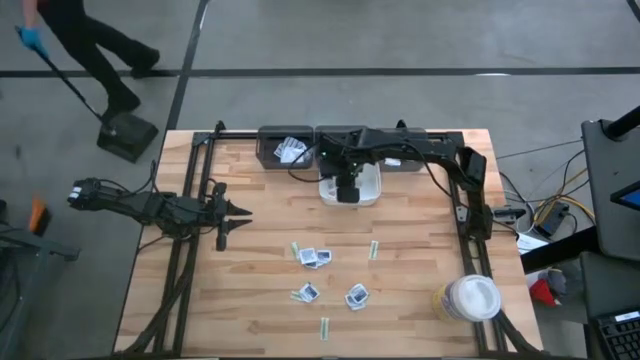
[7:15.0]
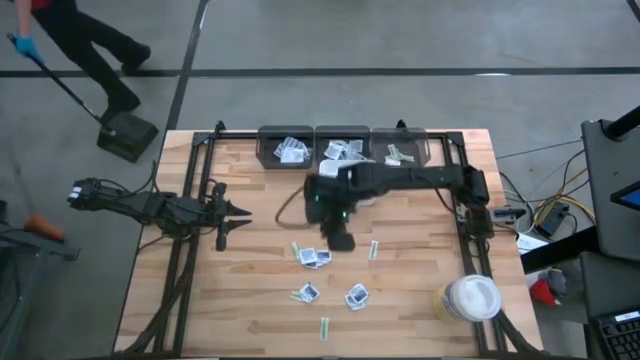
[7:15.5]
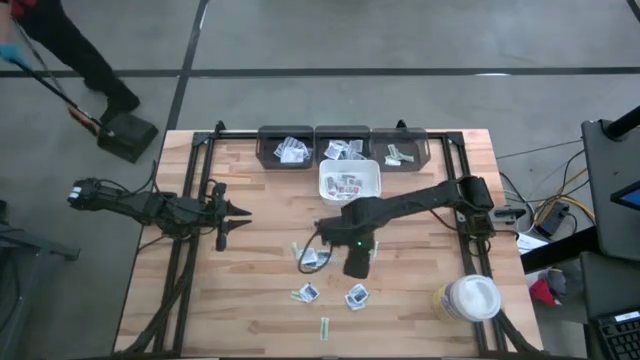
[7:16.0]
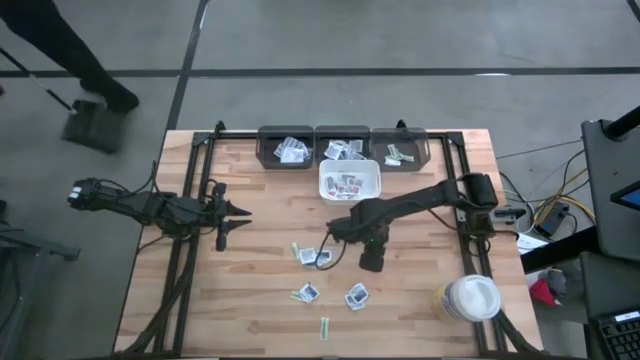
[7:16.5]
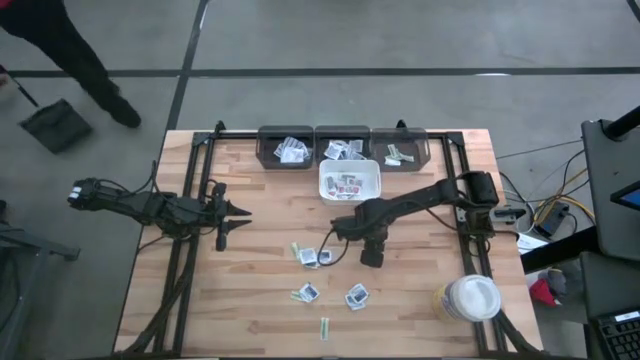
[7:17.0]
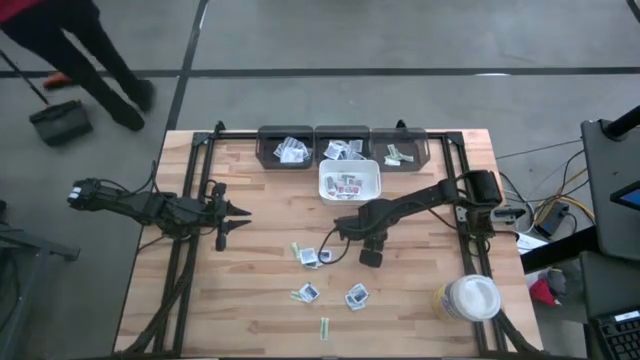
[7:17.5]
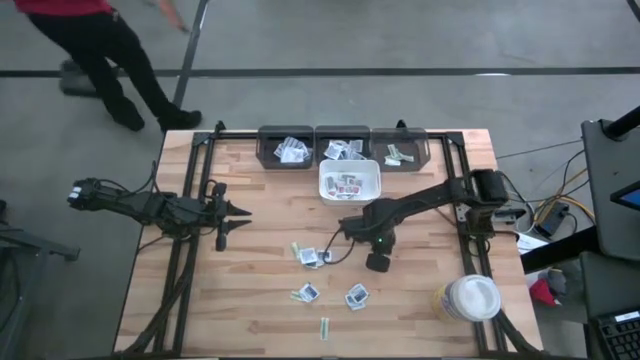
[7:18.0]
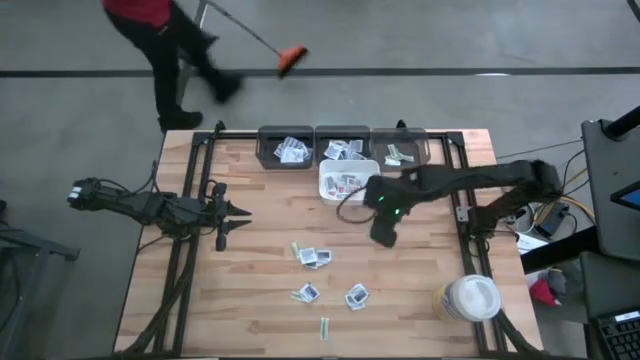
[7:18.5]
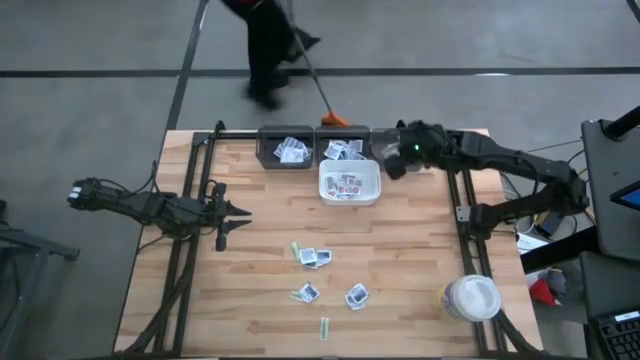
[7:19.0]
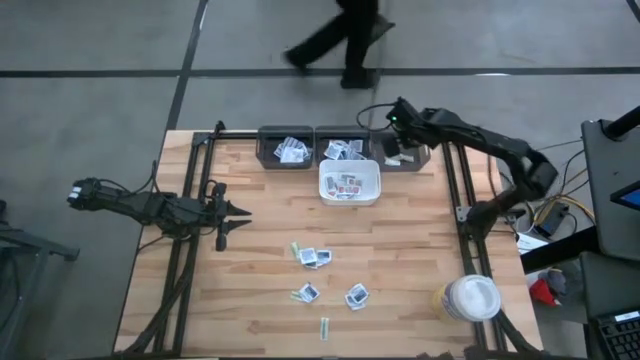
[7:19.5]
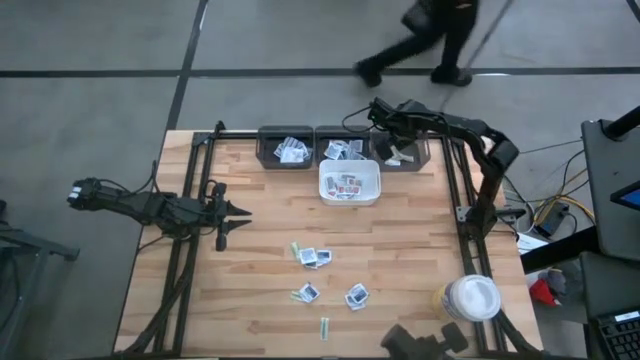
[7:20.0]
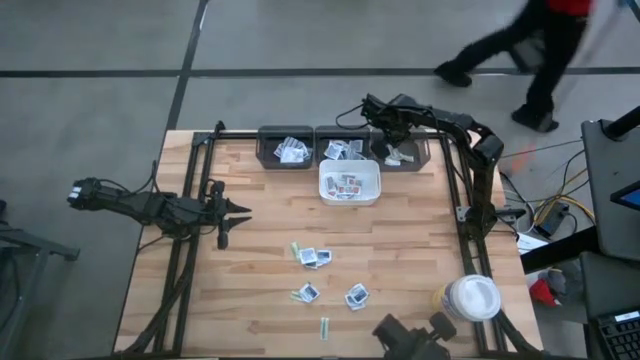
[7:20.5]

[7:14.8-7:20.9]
Task: Pick & Place First Aid Supplies
Put the right green bandage pack into the right gray bin

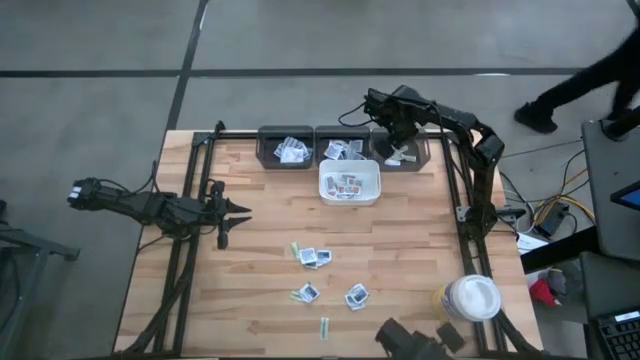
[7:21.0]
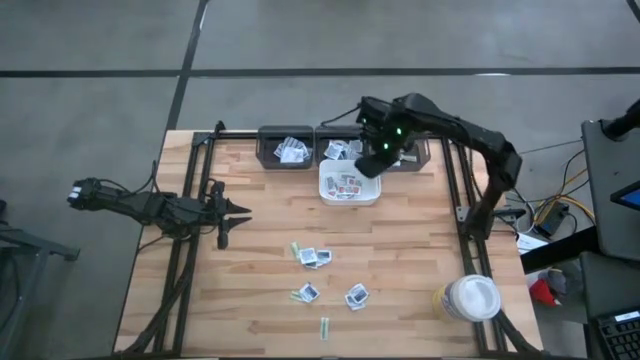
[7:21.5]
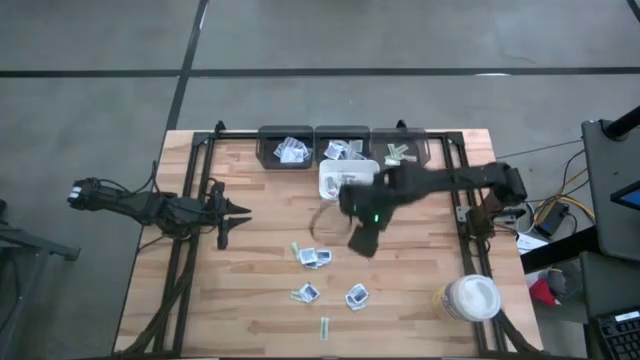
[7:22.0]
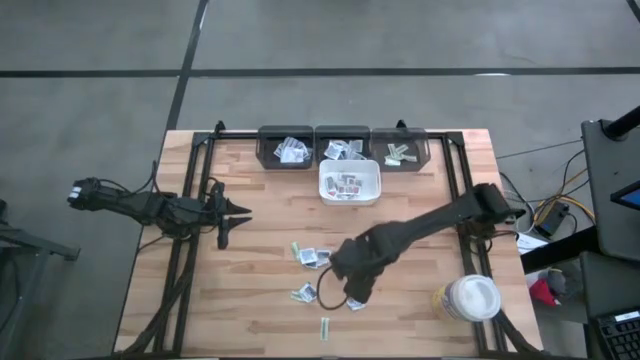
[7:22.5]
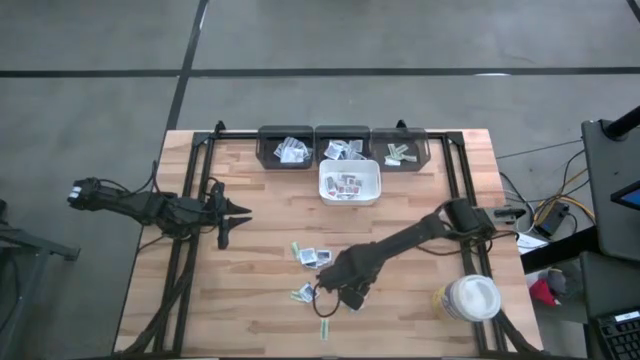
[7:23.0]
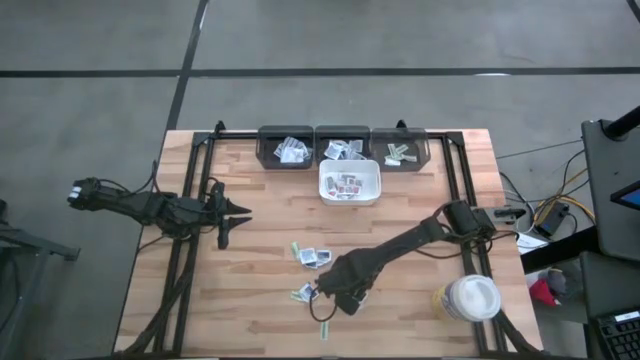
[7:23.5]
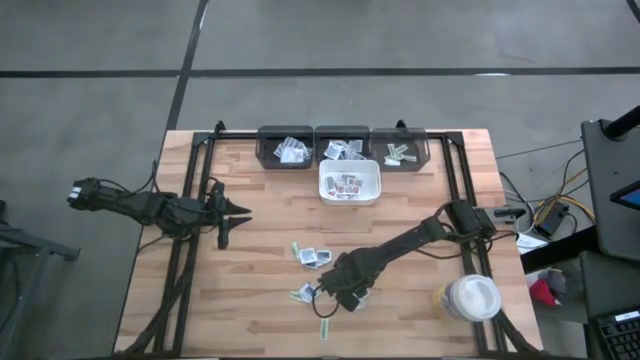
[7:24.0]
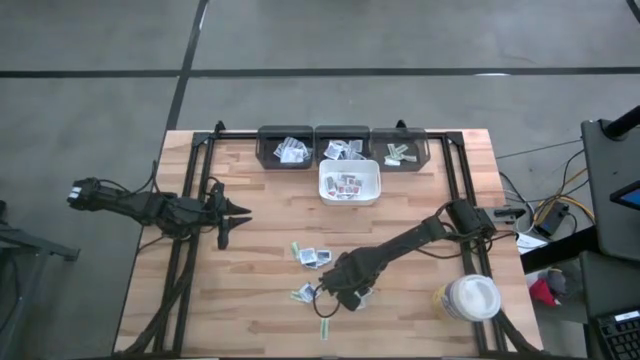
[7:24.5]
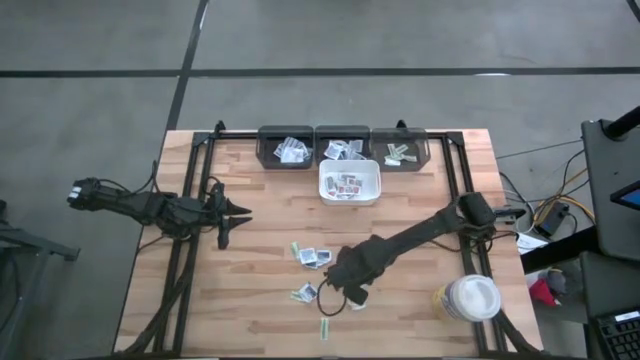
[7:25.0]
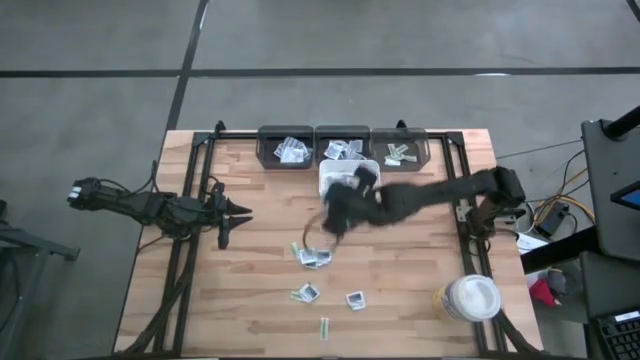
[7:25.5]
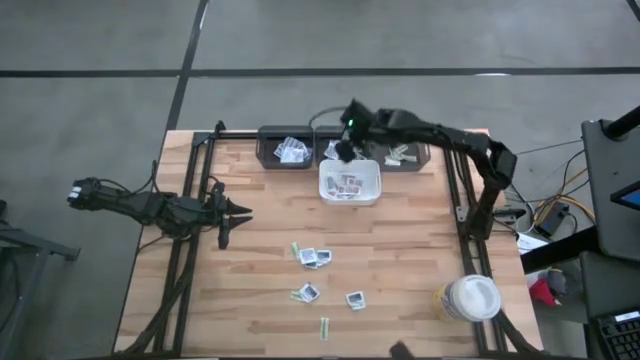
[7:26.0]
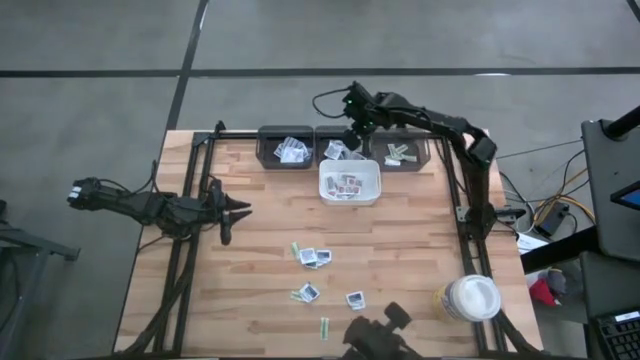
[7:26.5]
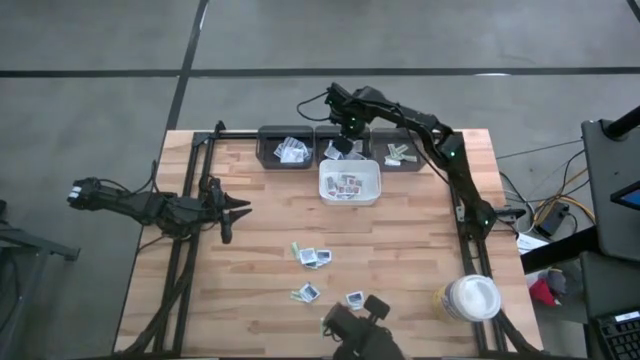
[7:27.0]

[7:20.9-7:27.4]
Put the blue alcohol pad into the middle gray bin

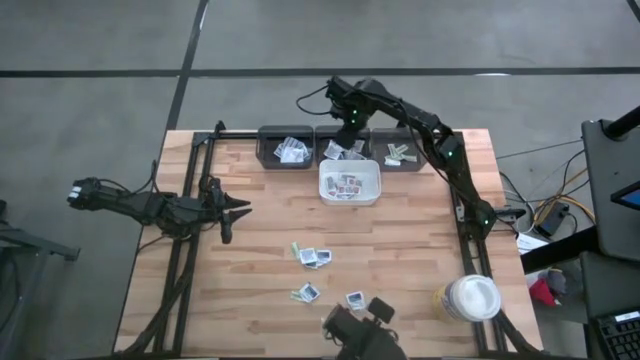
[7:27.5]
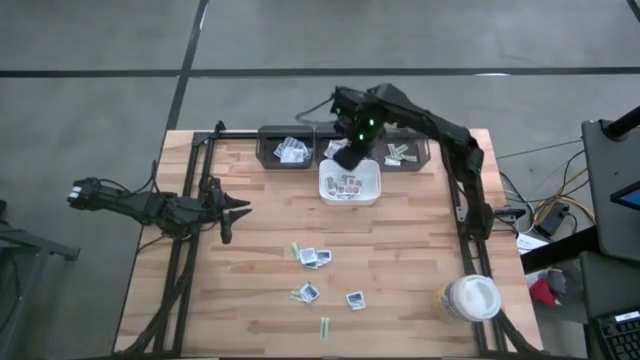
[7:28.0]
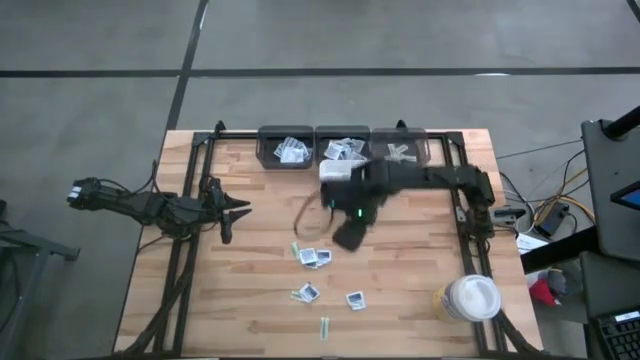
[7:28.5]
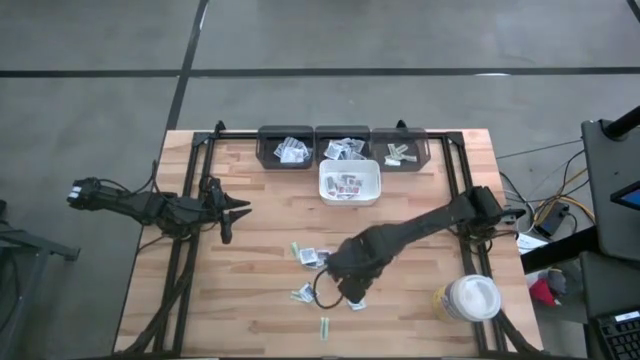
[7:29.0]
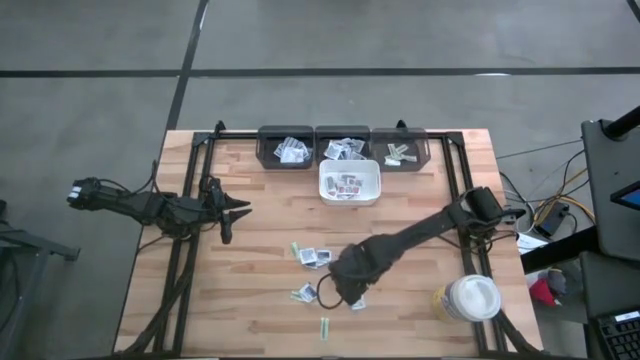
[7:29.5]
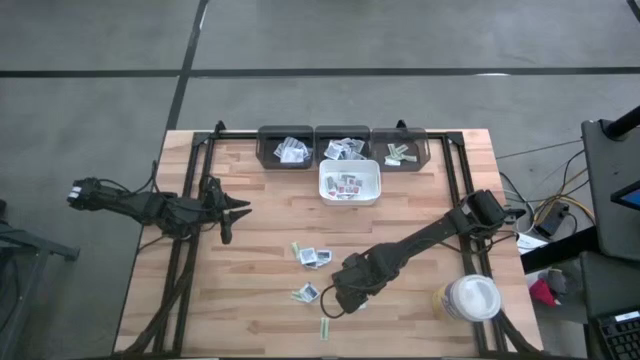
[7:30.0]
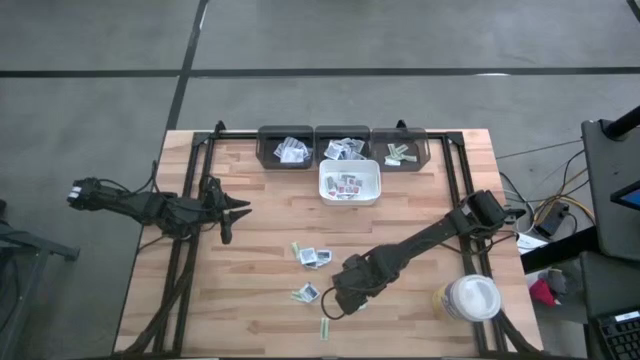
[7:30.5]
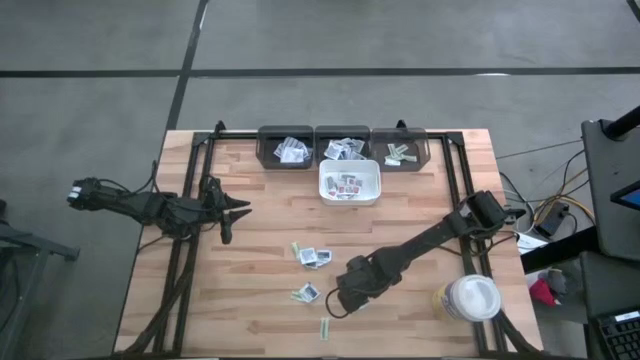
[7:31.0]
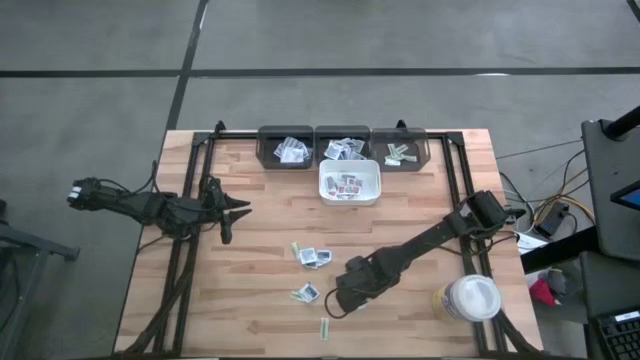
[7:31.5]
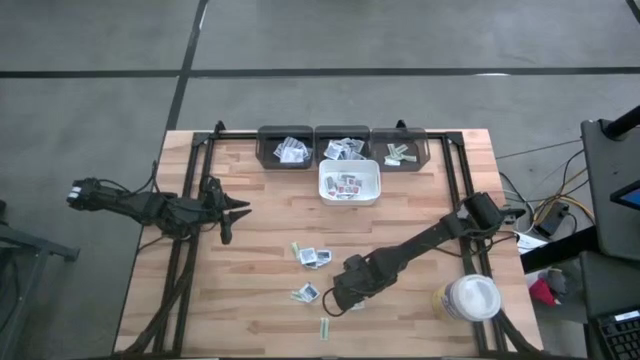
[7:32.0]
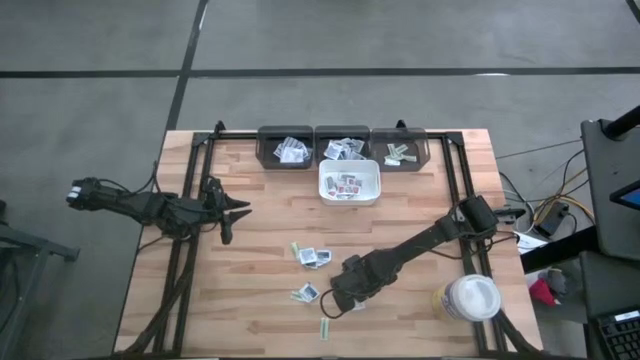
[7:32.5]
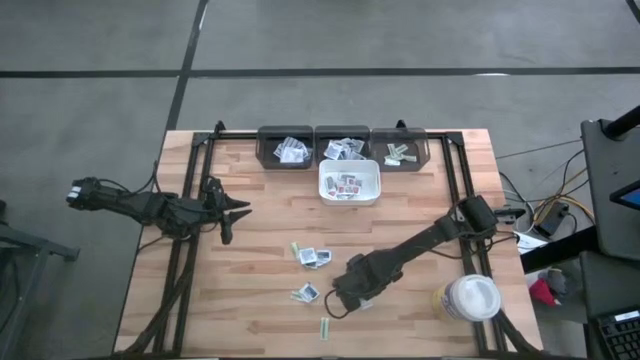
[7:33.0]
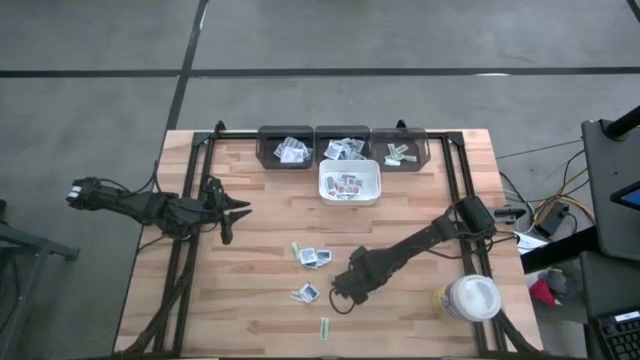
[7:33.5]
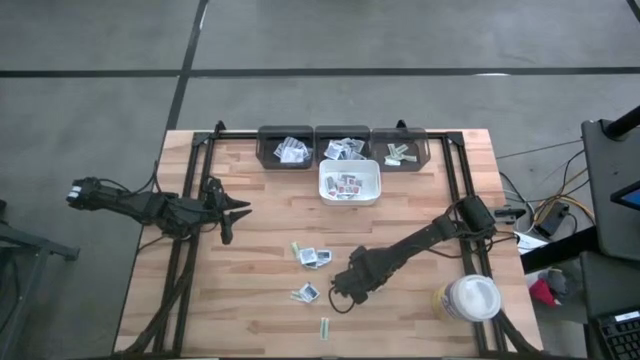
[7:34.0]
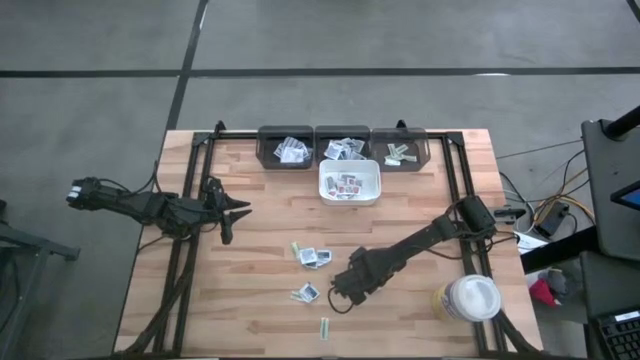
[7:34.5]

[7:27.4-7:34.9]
Put the blue alcohol pad into the middle gray bin

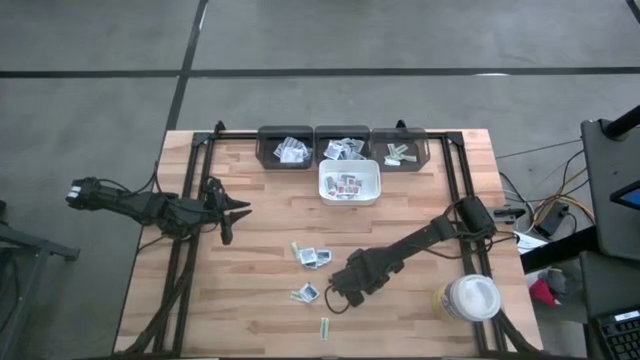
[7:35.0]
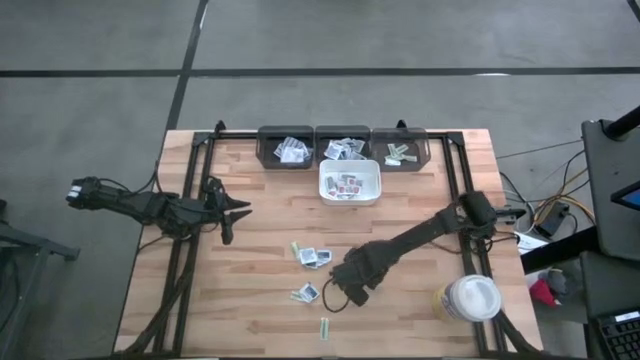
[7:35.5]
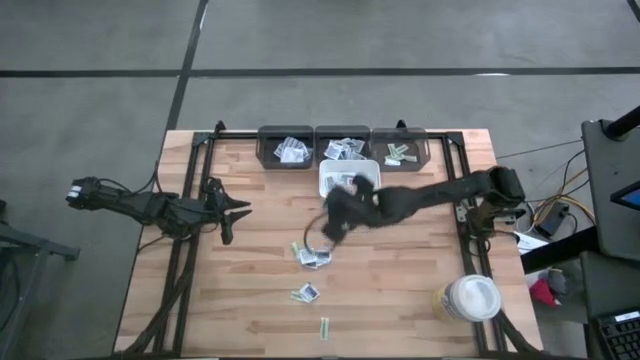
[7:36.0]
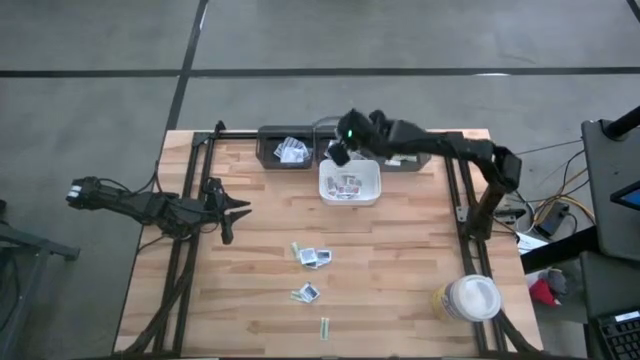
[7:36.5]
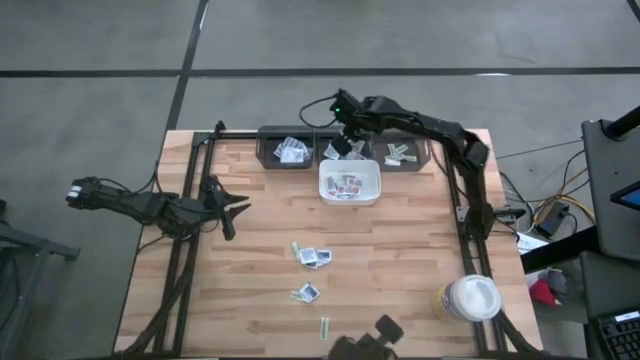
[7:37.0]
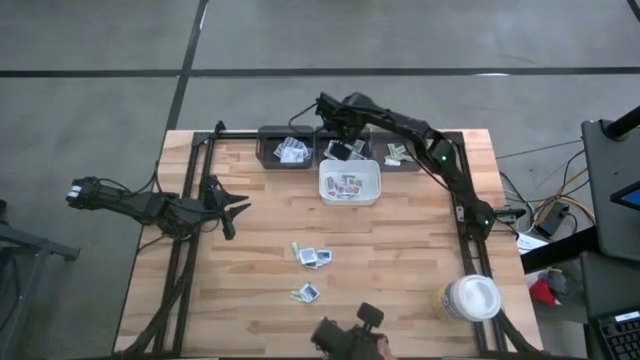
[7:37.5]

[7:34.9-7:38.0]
Put the blue alcohol pad into the middle gray bin
